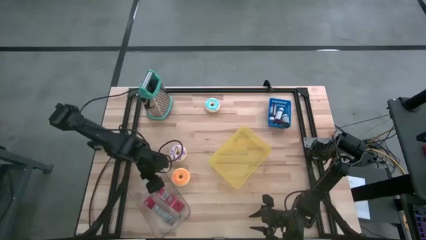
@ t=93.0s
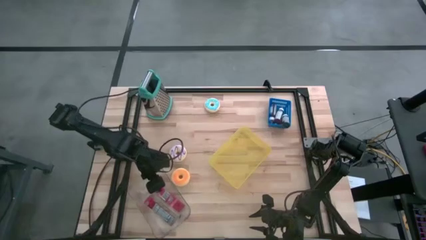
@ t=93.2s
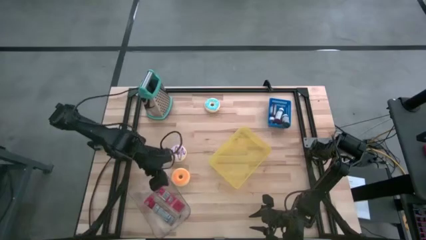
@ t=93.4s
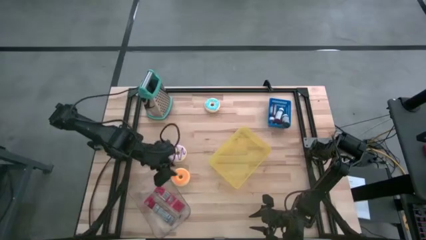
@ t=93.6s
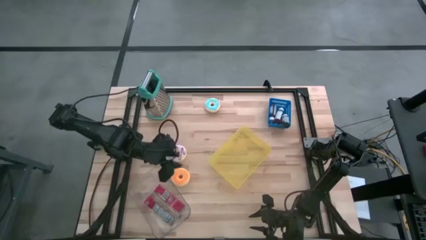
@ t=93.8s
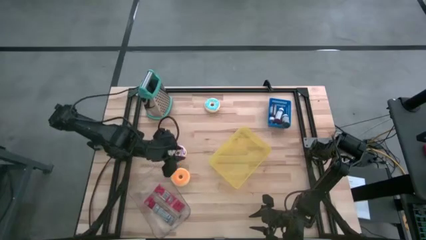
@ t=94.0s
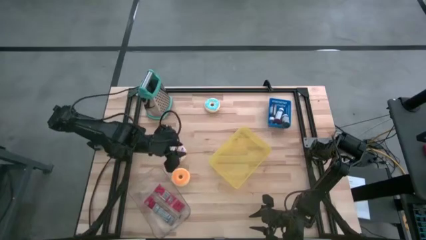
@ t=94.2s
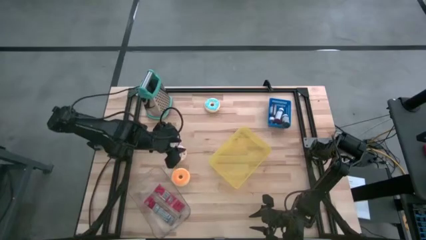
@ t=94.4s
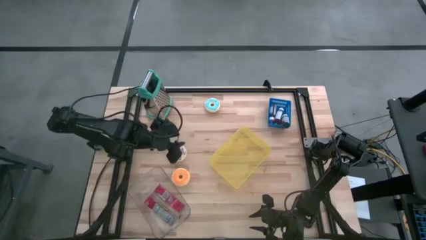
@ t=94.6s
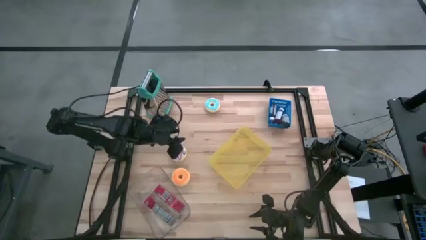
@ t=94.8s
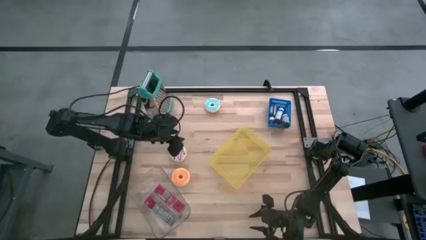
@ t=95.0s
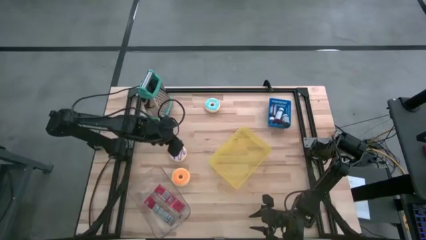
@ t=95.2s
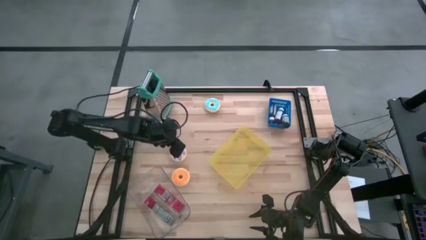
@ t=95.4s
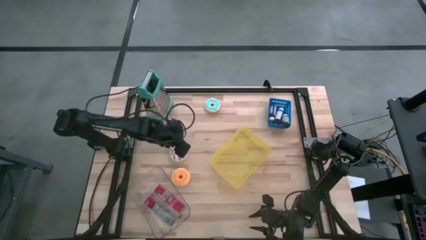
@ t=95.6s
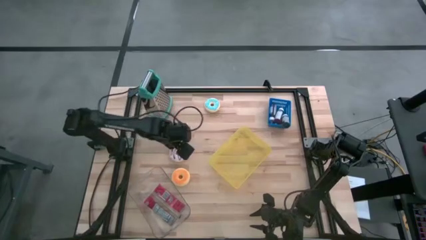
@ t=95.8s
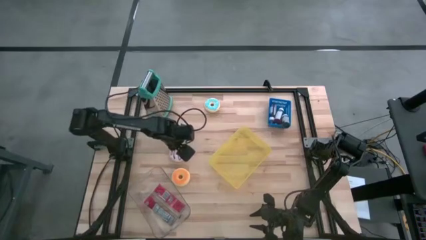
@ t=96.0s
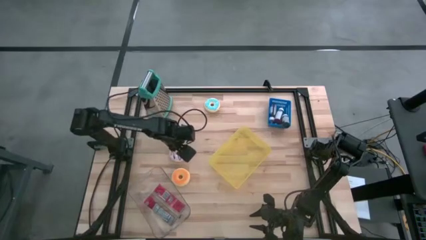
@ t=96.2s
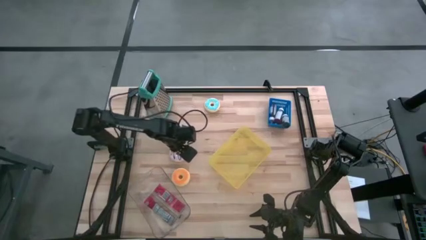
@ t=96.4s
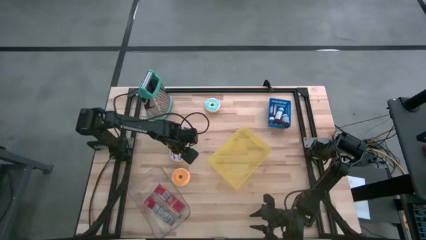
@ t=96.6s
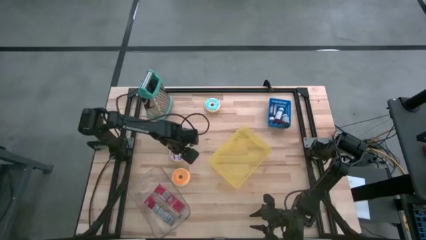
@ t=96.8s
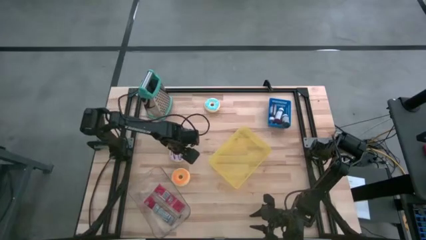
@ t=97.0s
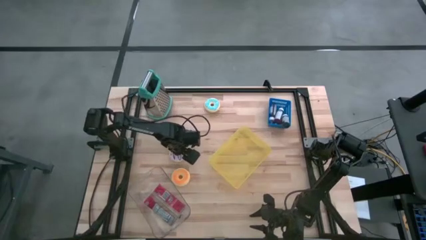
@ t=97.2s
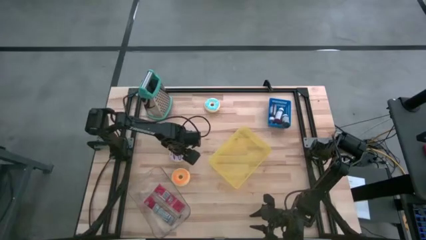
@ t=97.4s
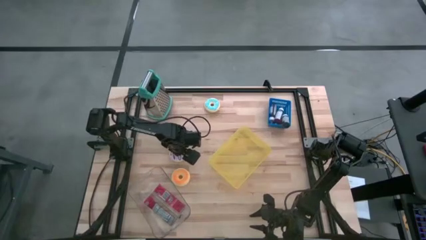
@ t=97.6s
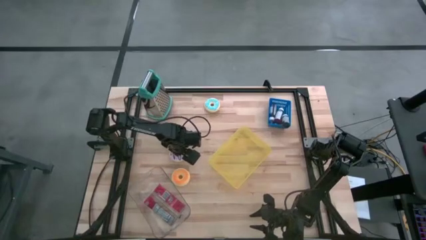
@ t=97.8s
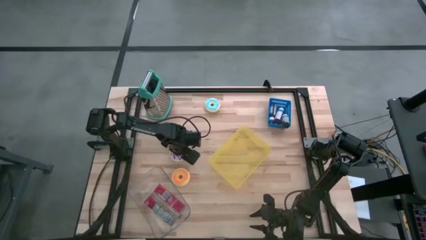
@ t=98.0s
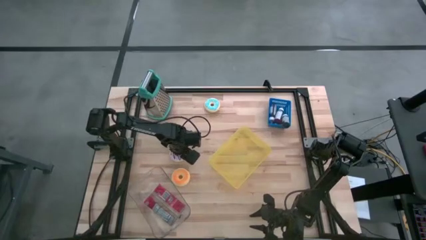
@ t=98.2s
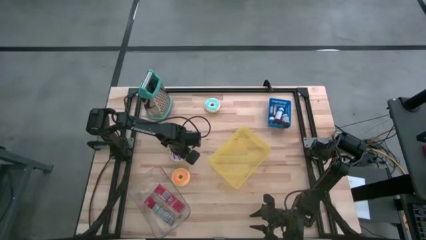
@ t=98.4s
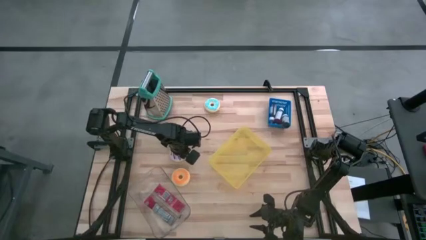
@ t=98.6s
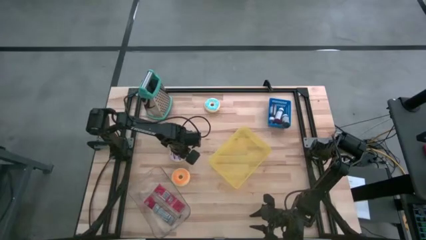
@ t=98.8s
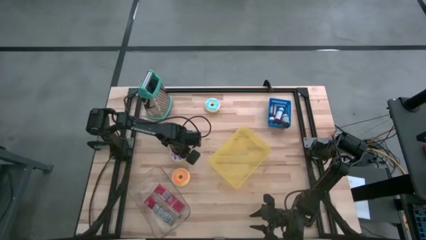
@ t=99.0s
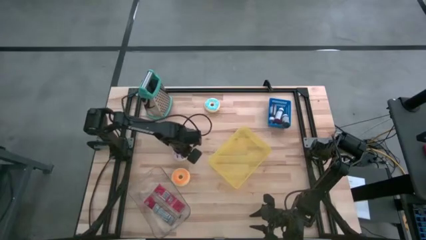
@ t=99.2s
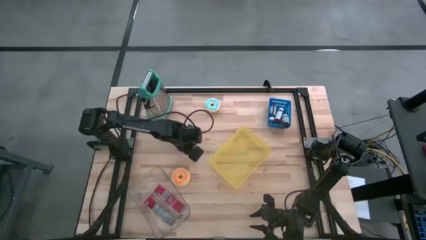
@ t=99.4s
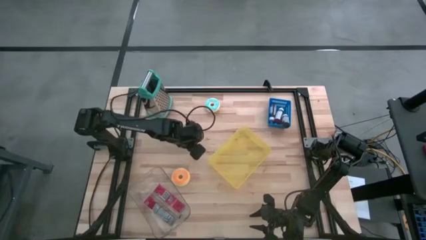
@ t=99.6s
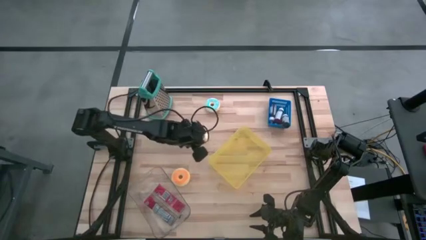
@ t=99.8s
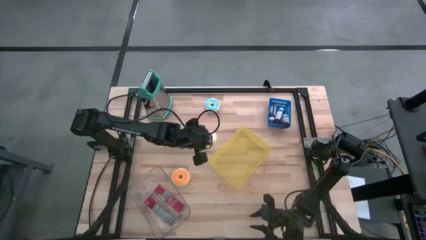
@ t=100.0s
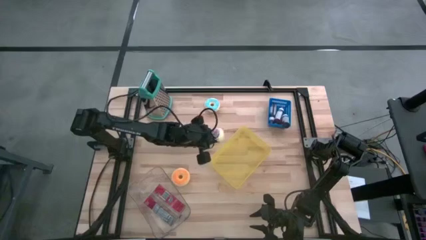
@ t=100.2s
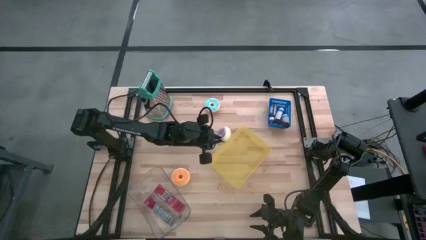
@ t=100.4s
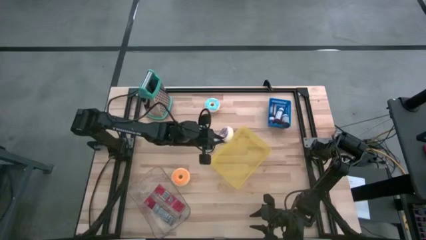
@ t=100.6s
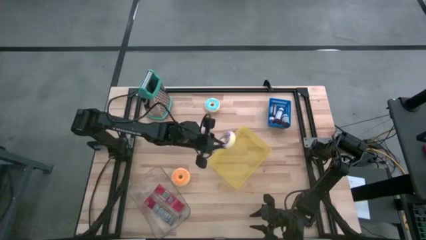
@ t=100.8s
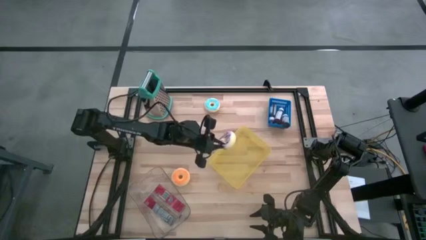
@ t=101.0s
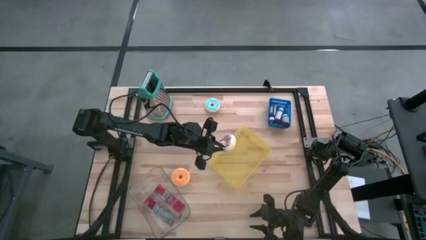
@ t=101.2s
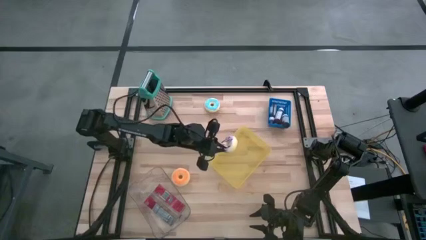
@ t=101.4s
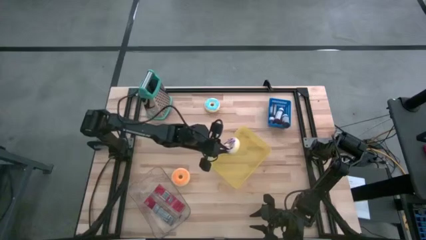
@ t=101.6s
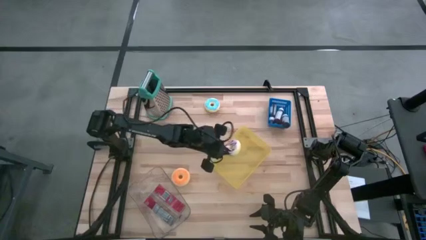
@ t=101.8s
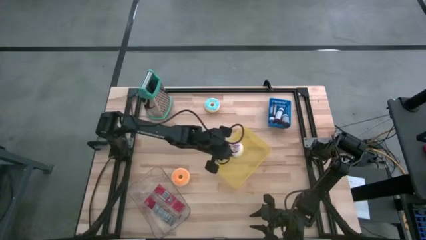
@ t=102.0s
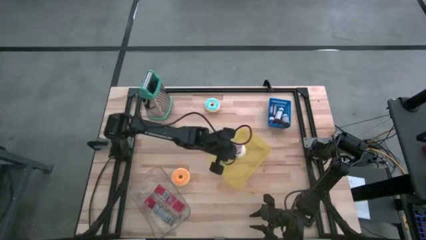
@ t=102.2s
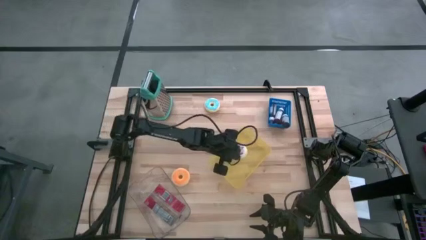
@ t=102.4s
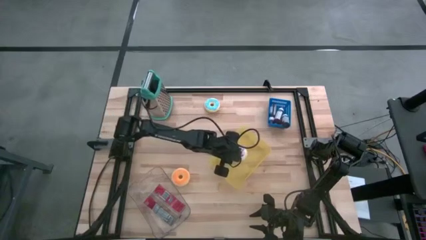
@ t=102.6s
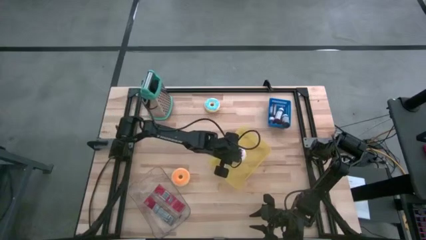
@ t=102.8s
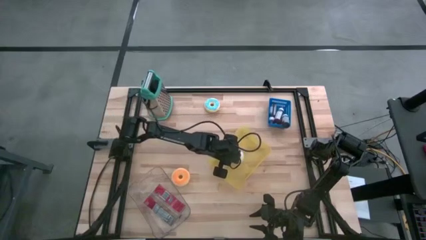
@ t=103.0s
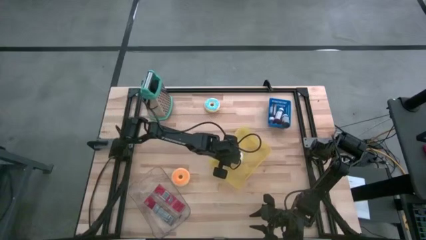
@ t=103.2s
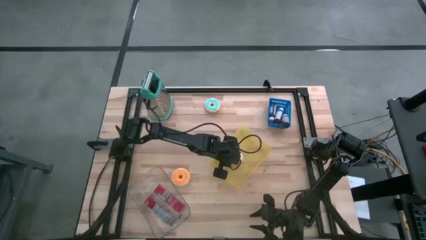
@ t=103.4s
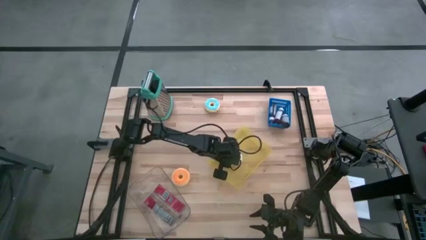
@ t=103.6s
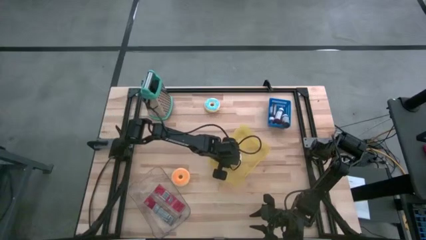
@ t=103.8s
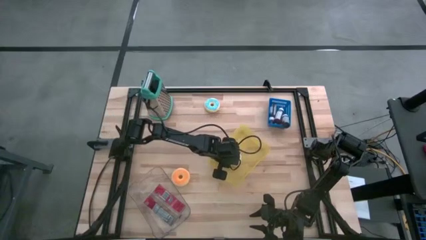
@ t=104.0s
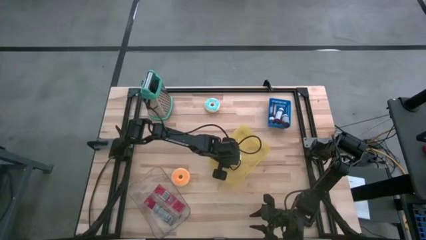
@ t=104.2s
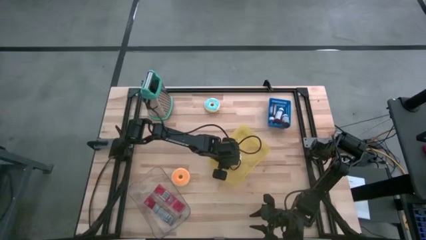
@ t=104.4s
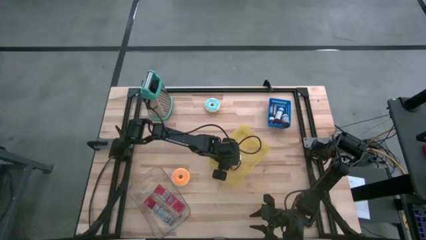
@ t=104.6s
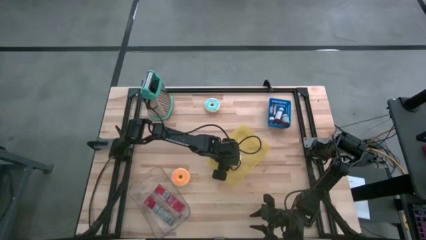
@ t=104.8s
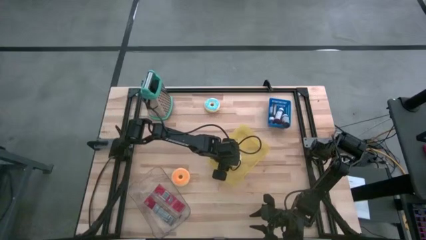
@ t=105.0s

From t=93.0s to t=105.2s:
Task: Pick & Place Food Item
Put the purple donut into the yellow bin
